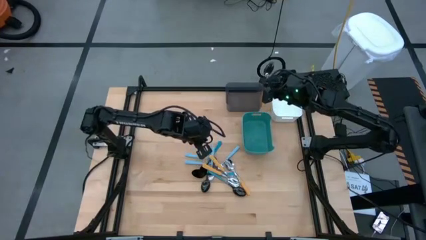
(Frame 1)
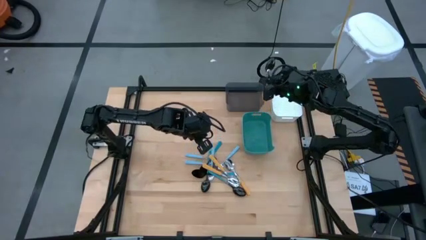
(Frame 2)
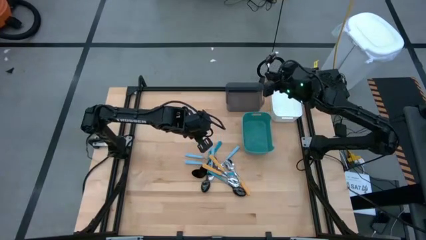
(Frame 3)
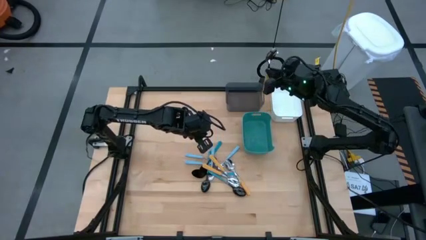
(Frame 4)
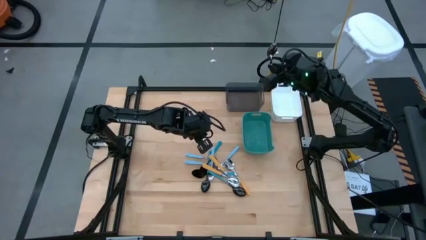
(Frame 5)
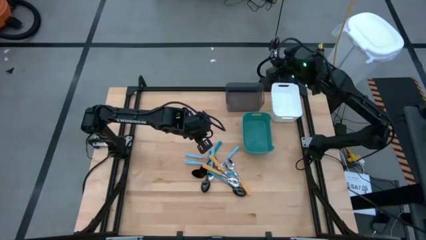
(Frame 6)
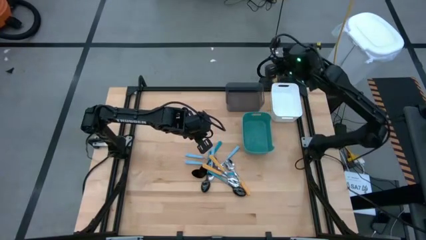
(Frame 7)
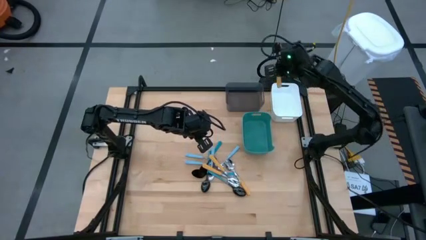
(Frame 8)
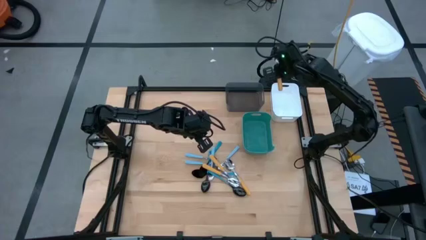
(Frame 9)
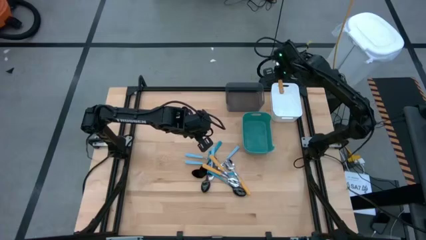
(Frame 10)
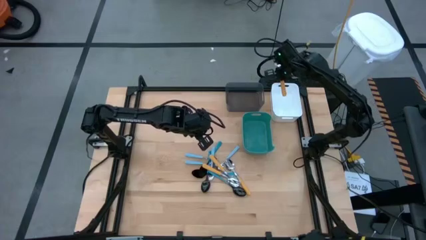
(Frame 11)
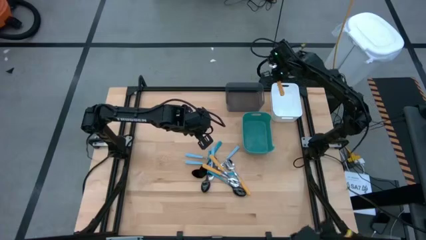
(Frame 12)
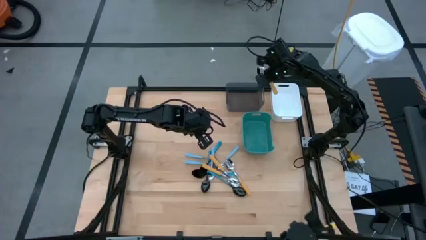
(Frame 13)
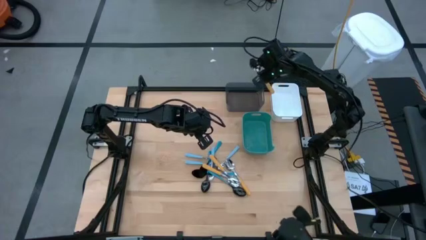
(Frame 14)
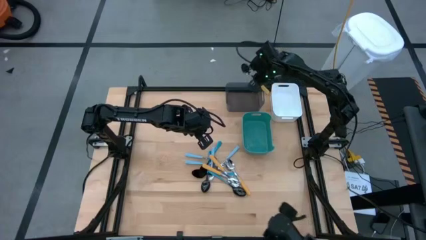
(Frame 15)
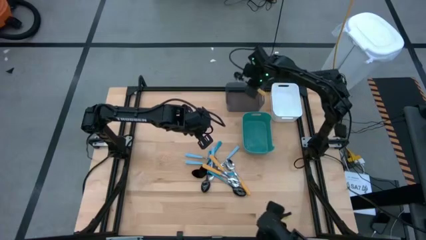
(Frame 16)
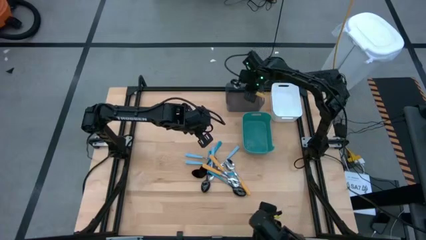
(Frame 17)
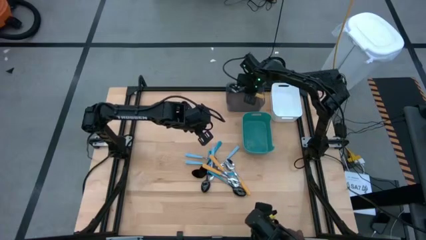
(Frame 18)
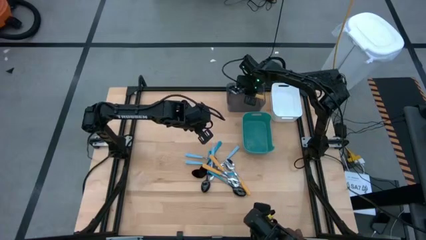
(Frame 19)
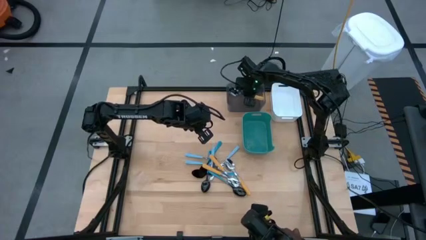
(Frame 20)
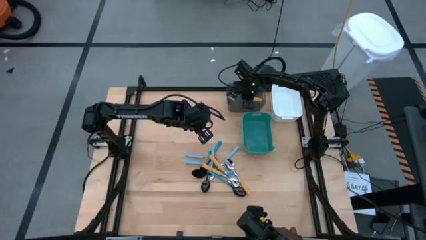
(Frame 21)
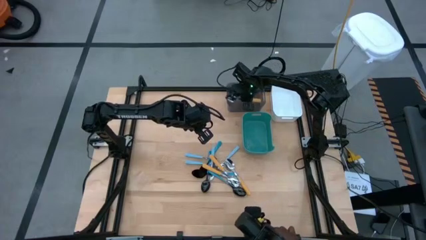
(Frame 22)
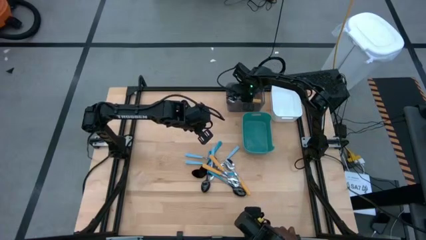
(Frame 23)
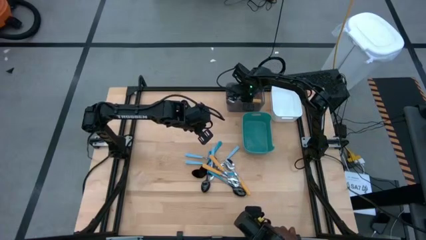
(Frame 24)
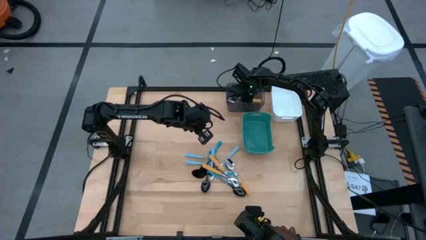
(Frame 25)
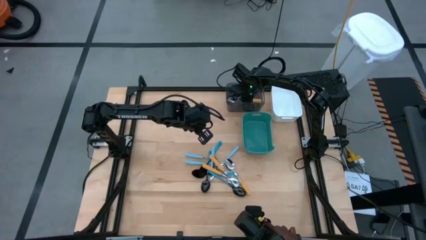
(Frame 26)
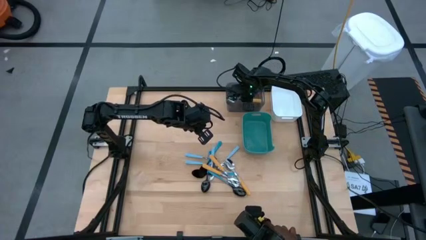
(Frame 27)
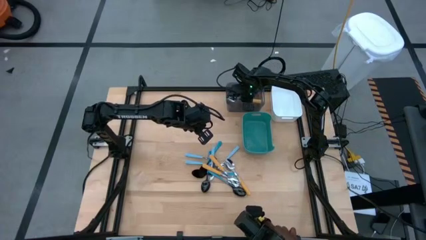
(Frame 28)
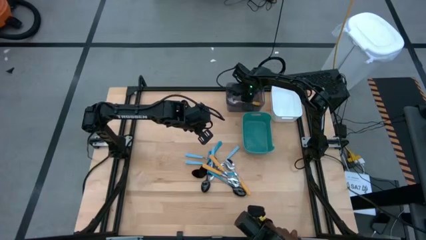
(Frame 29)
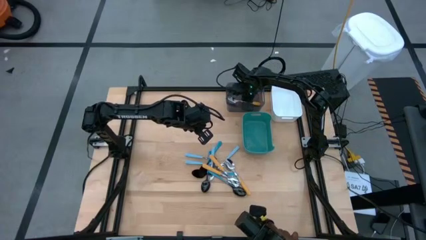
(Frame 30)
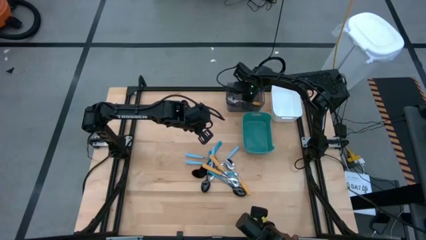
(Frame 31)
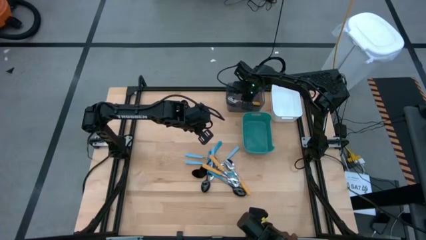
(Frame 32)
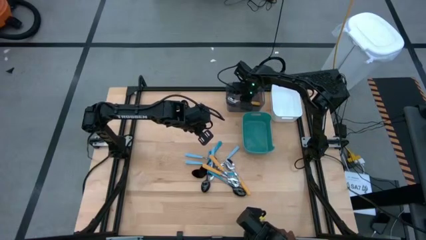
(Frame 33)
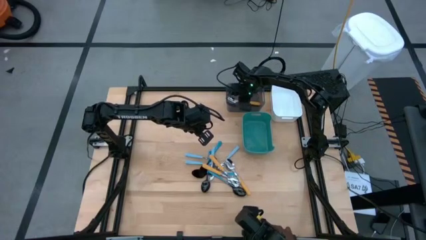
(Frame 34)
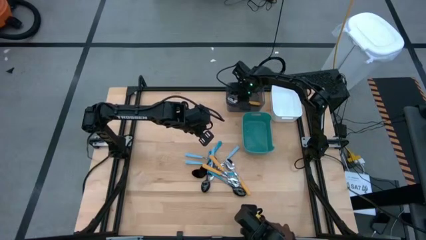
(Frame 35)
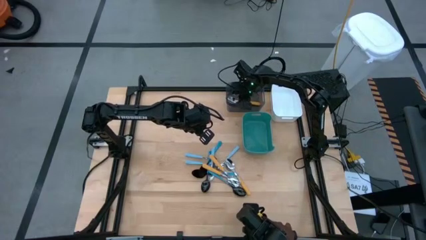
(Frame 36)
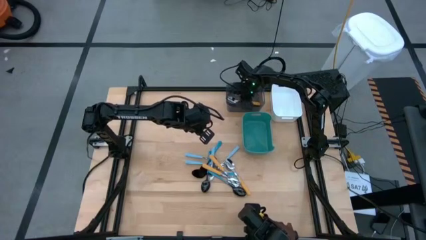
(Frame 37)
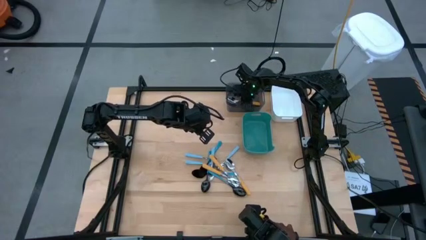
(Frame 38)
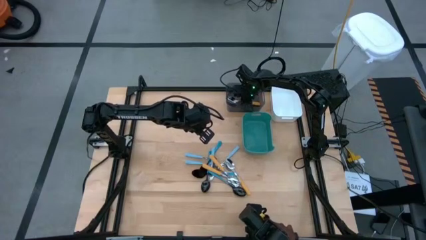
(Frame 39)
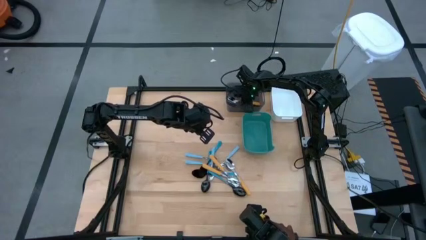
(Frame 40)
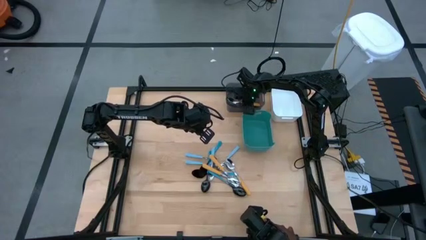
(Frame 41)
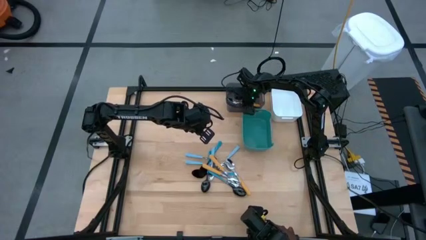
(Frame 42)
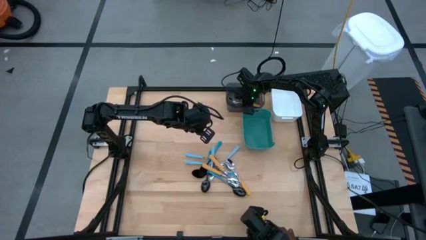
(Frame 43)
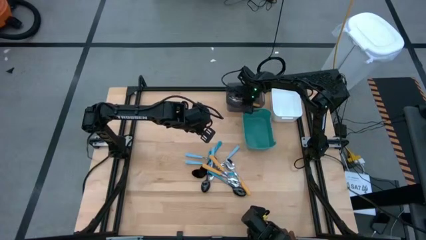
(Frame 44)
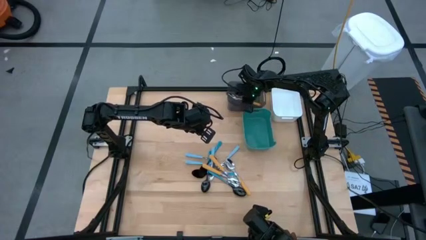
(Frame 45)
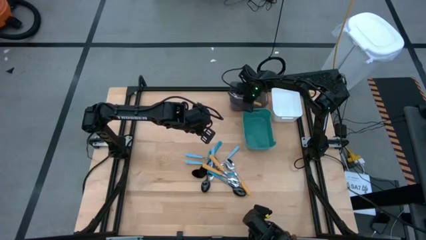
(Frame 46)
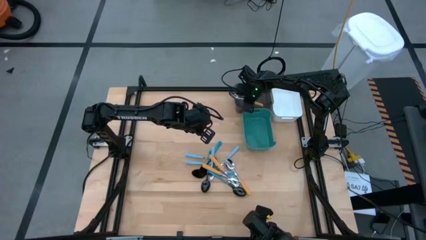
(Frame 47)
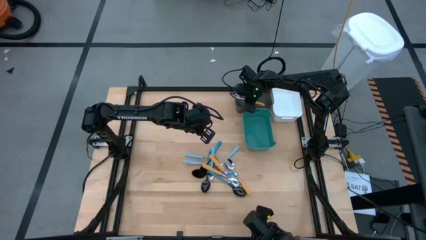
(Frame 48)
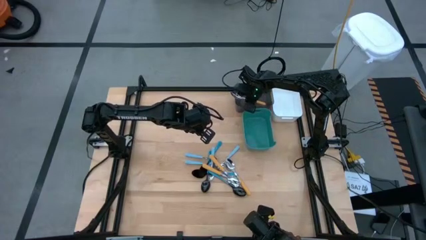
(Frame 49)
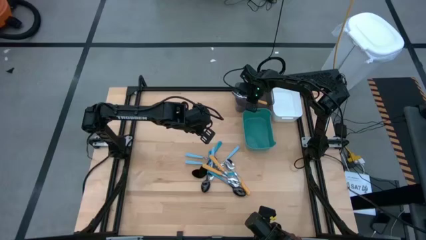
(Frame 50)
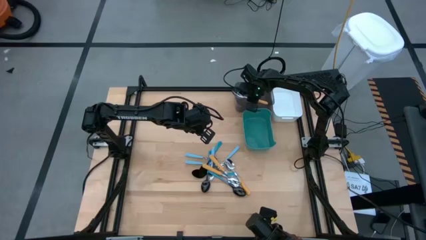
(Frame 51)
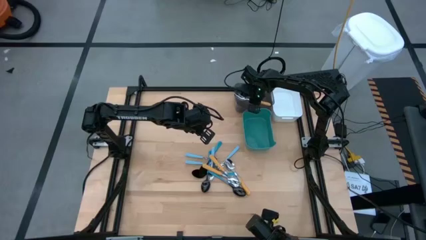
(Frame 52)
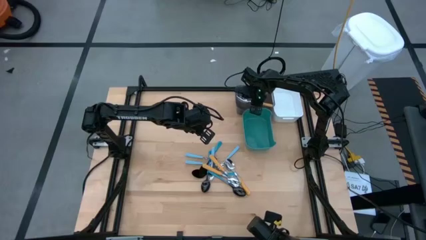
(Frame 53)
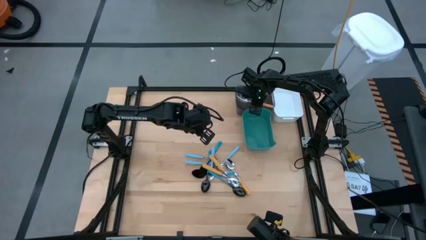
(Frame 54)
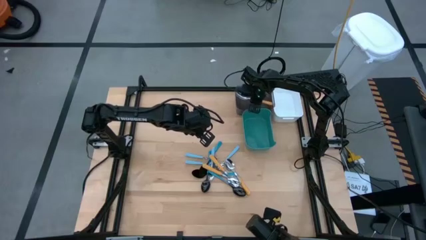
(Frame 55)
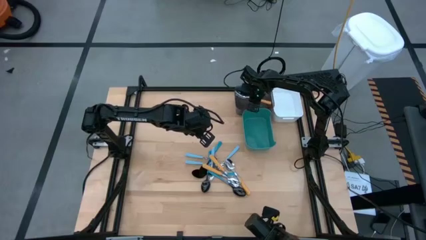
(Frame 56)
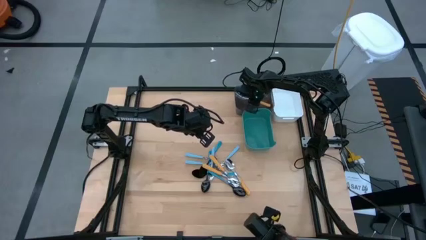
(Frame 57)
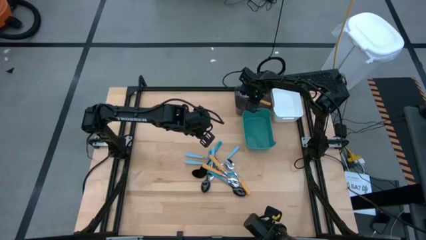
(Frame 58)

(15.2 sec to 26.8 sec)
Task: Sort silverware by color (type)
Put the orange spoon into the black bin

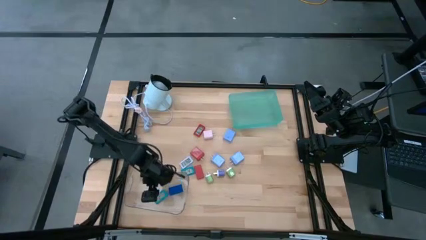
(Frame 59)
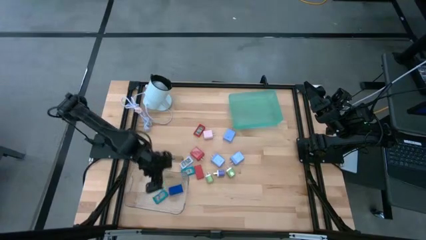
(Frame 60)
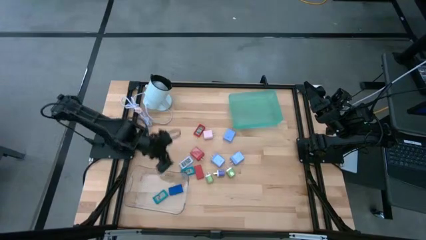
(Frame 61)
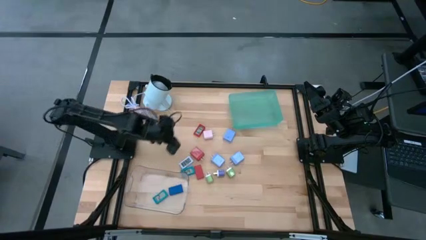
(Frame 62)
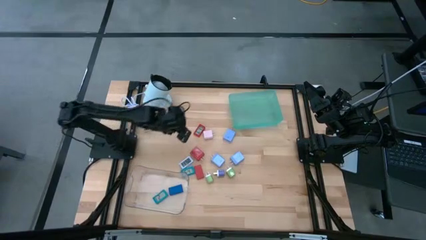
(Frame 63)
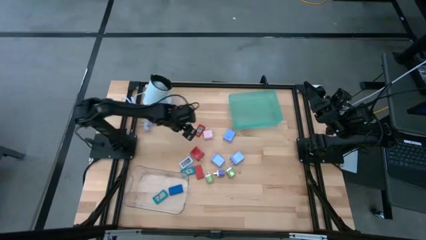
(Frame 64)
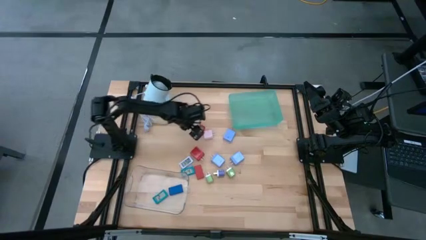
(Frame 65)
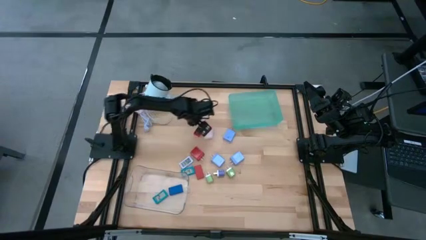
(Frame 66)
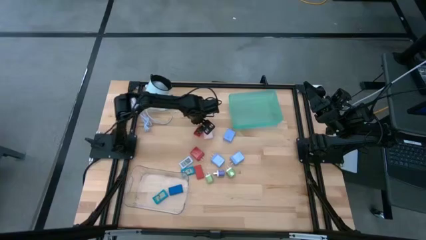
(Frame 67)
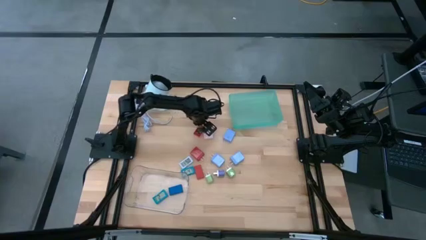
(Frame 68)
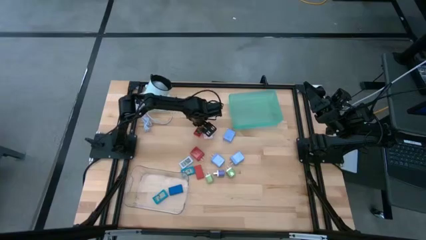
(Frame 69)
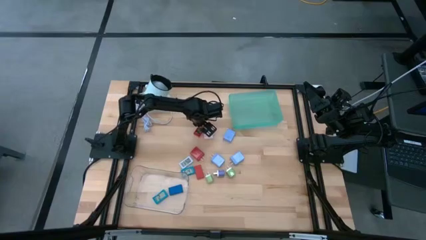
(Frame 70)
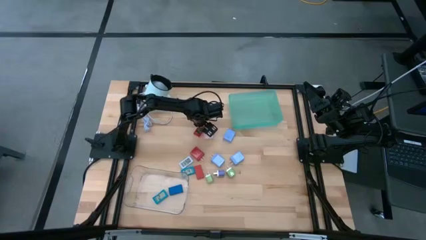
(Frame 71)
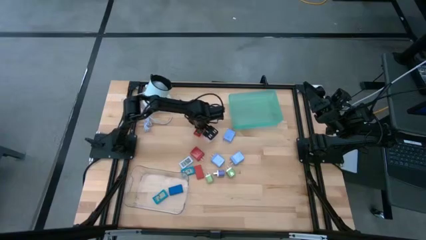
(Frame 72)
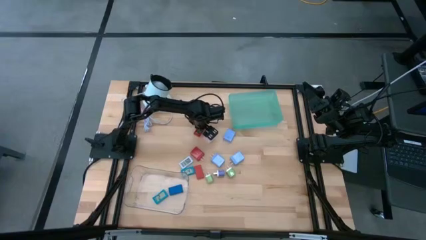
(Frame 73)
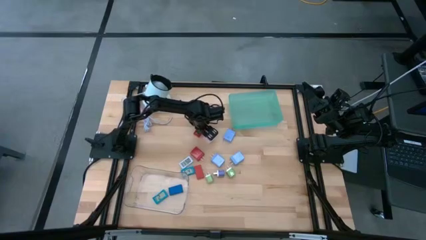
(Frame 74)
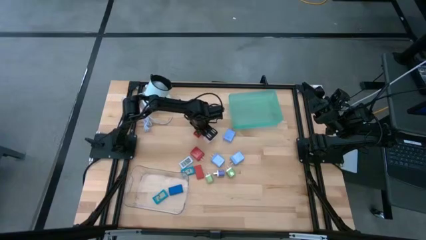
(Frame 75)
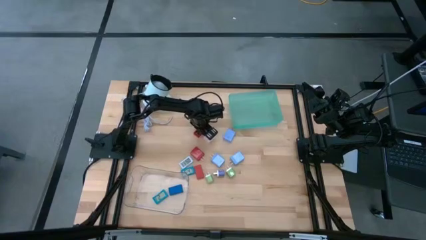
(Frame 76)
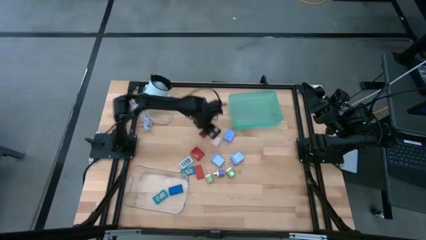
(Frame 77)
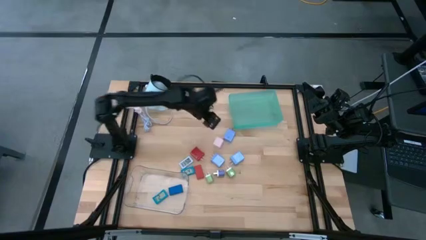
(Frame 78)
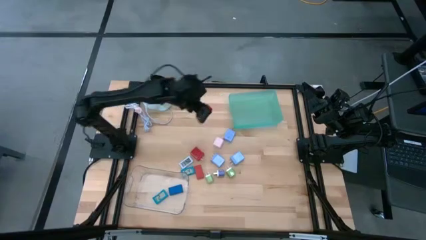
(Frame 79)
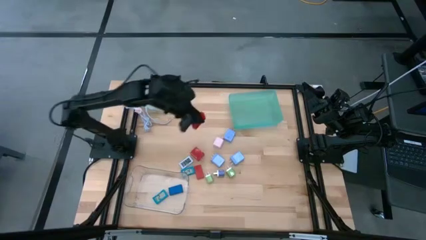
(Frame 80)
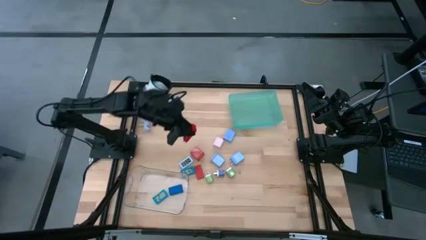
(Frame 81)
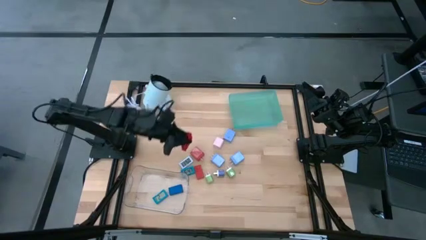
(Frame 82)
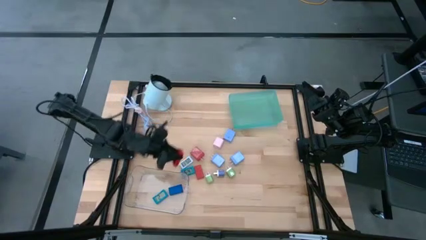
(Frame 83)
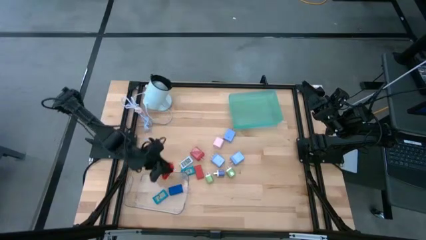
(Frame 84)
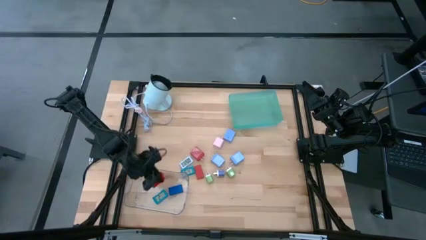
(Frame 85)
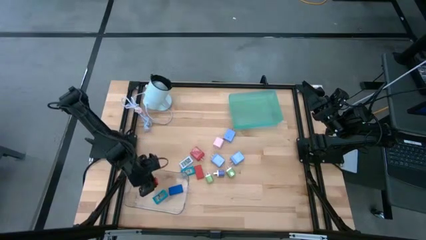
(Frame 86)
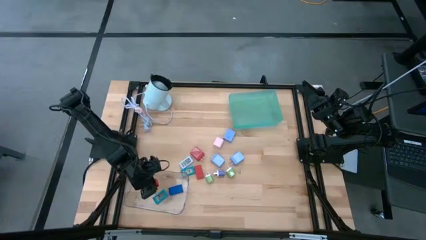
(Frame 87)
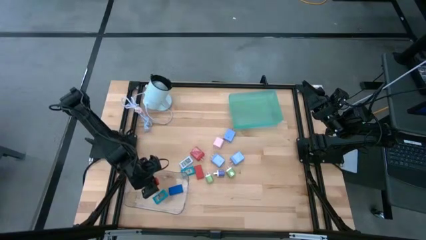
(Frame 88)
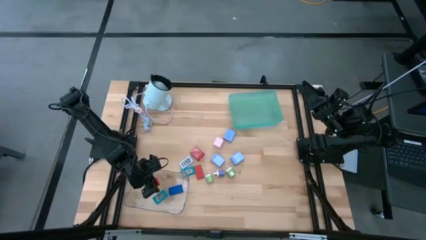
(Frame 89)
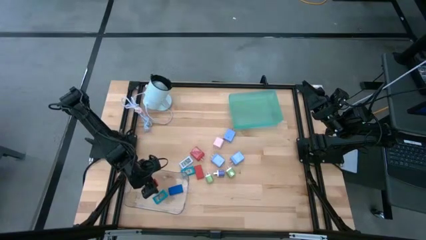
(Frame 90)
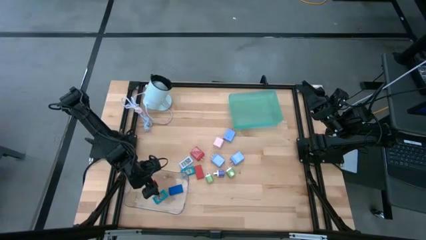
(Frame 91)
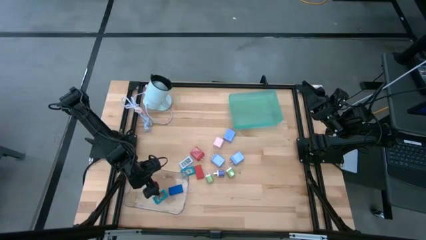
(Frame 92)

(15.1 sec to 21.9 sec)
Task: Pick & Place Office items
Put the red digital clock into the transparent bin
